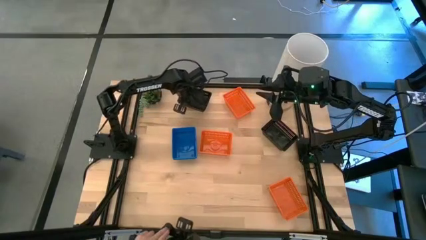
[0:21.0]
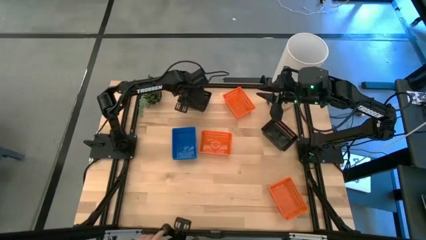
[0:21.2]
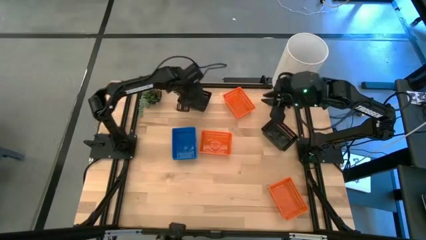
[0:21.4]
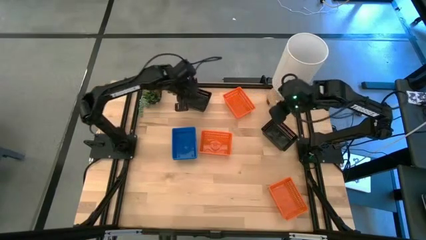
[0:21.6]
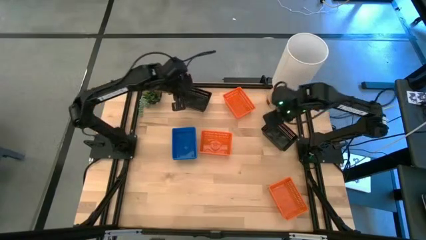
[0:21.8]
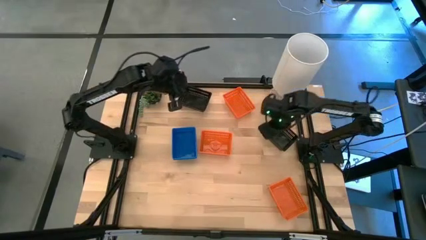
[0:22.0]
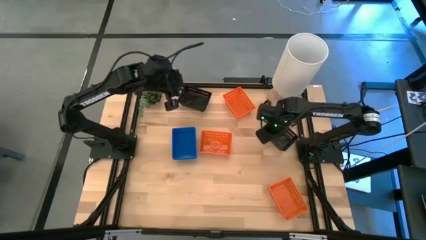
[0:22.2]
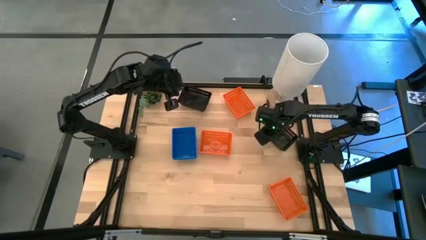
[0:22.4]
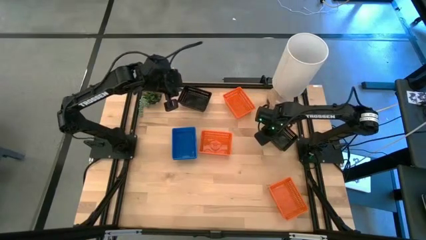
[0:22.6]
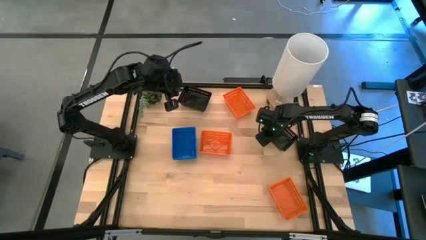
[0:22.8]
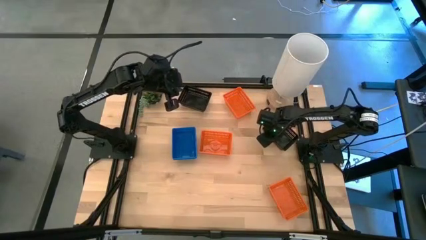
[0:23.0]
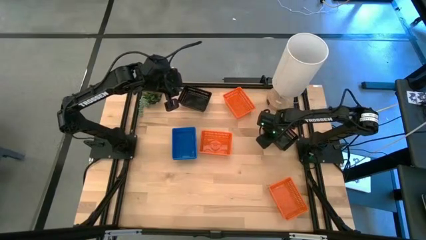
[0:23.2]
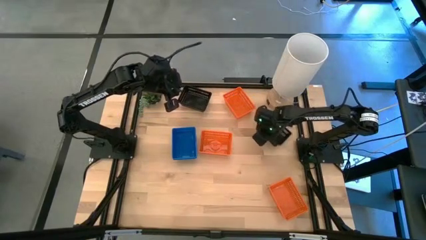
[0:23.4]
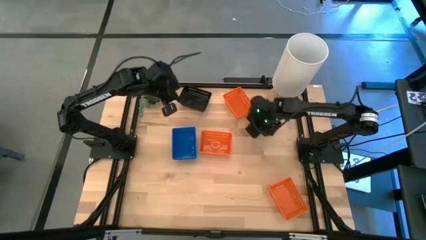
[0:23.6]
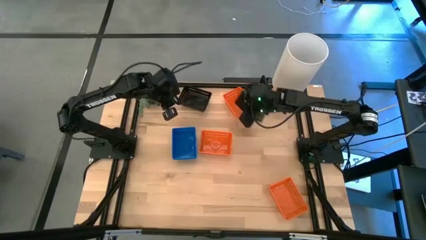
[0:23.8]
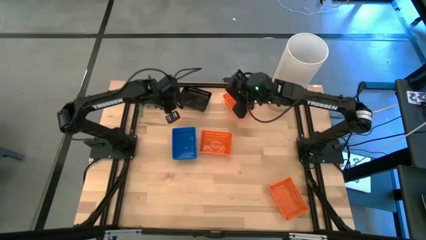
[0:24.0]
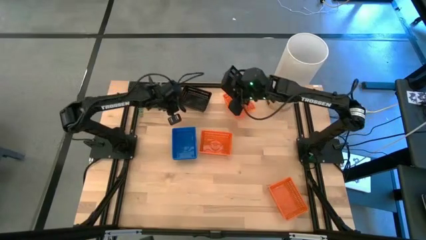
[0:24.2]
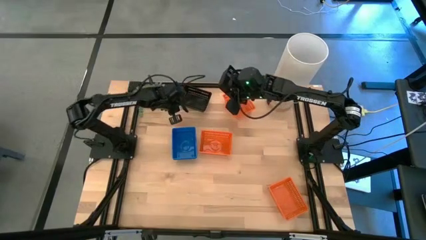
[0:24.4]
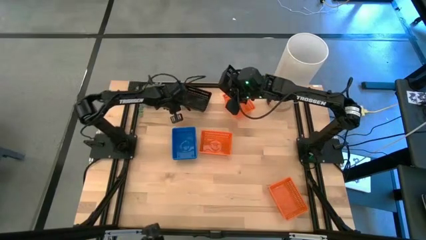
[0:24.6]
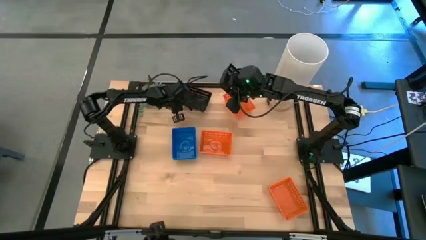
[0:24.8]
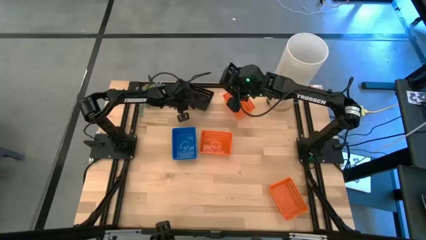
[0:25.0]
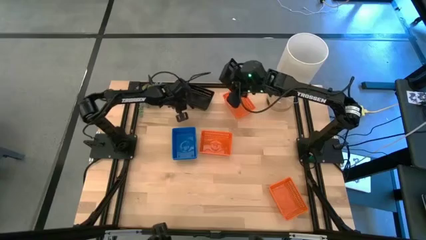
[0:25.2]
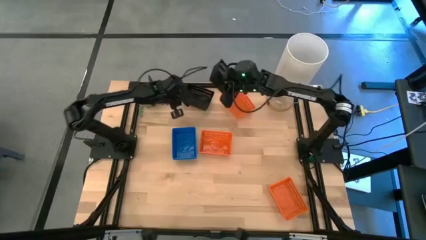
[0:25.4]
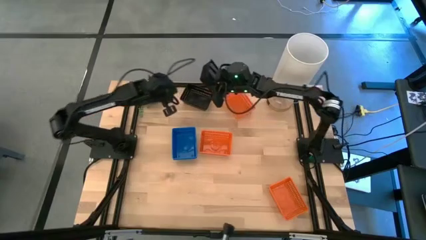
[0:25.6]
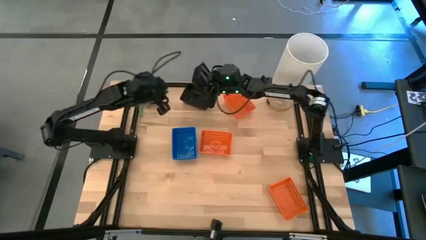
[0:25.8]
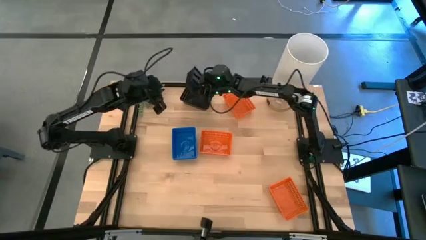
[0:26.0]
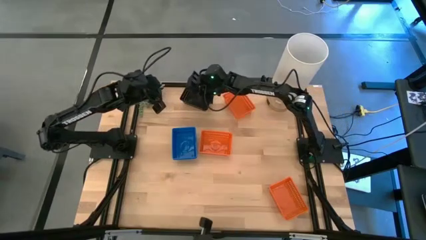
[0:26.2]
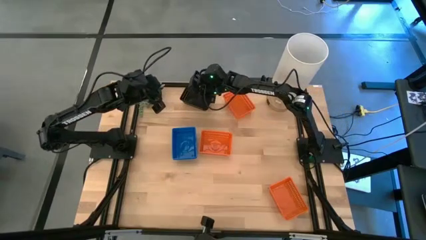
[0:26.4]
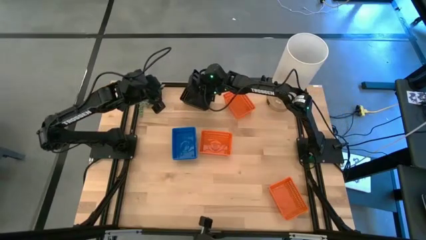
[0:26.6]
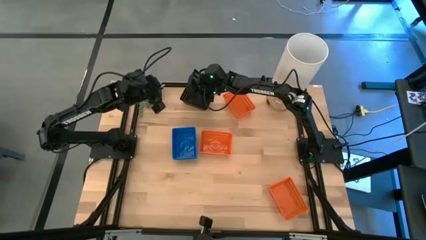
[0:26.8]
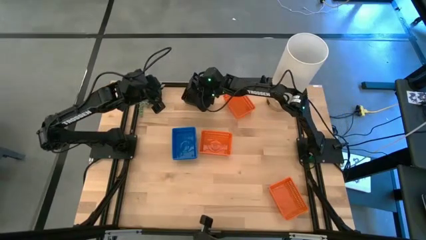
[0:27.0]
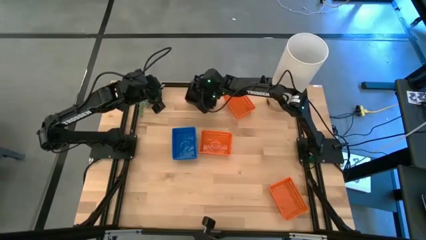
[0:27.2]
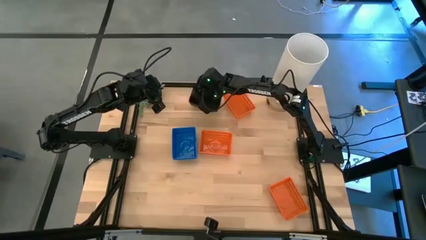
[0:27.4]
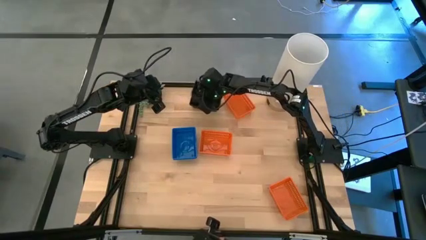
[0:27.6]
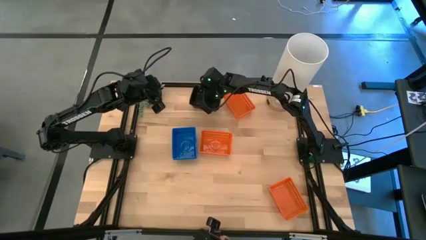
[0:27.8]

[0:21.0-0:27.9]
Stack the black bin on the top black bin

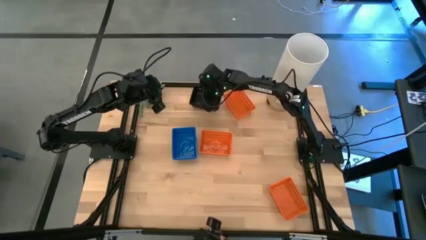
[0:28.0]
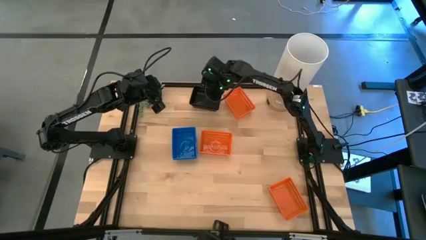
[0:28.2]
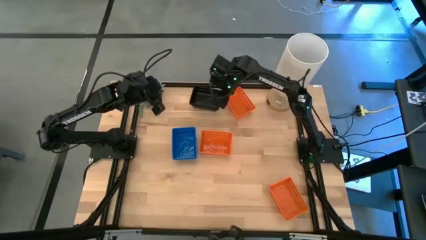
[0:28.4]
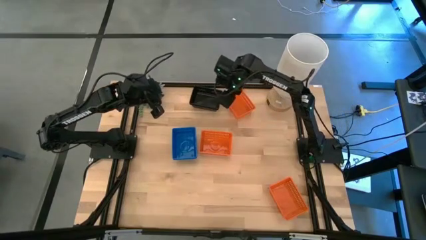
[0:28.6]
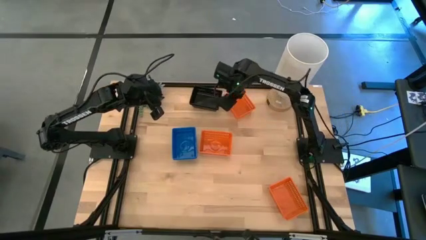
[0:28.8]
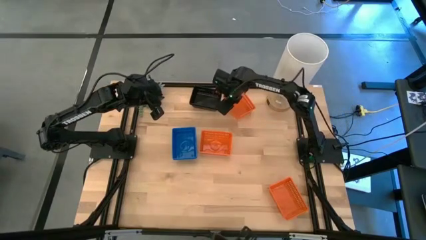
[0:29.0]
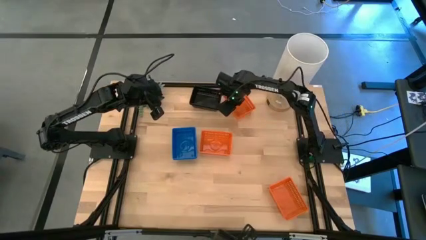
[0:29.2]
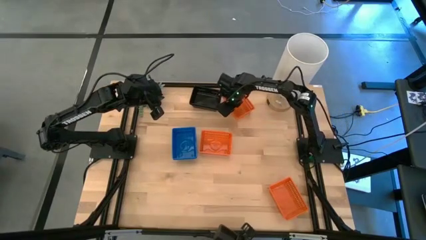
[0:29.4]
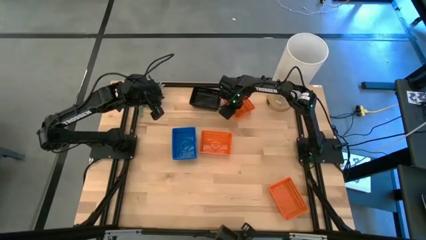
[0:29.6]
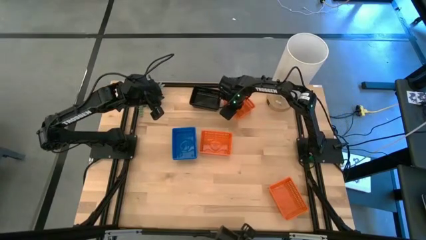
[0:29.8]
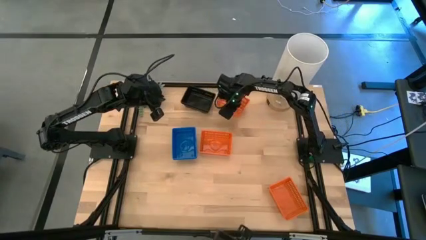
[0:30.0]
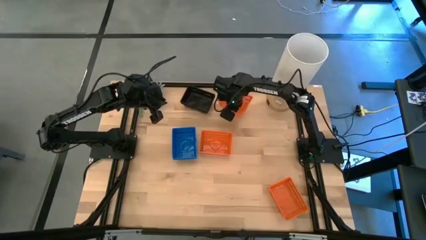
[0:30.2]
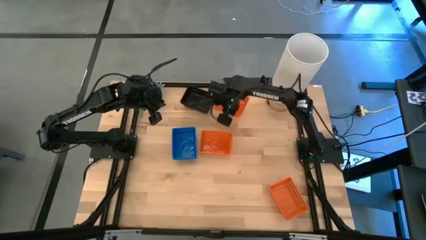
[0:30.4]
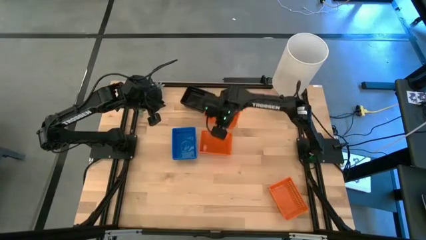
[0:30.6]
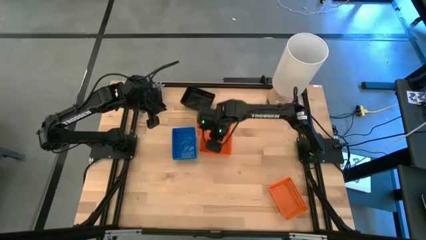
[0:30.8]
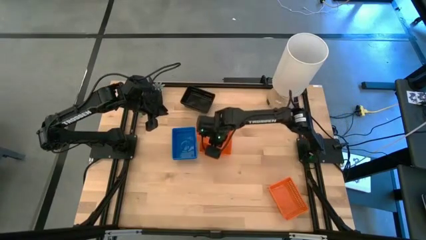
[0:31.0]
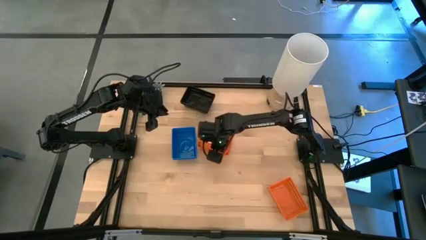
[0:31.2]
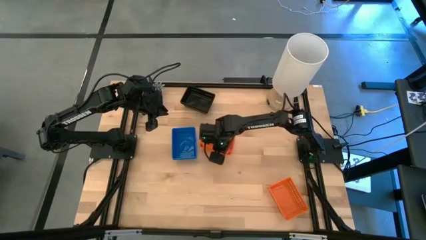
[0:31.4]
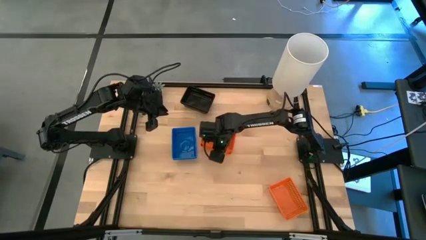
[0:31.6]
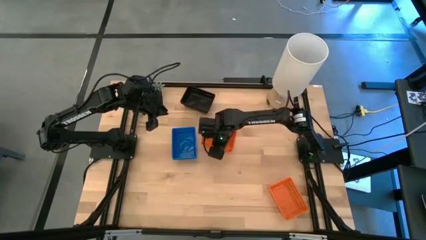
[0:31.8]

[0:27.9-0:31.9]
Stack the top orange bin on the middle orange bin

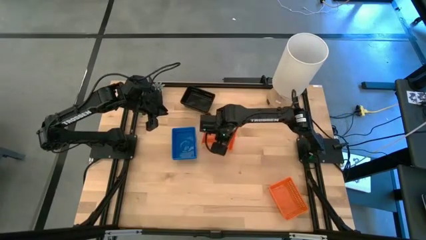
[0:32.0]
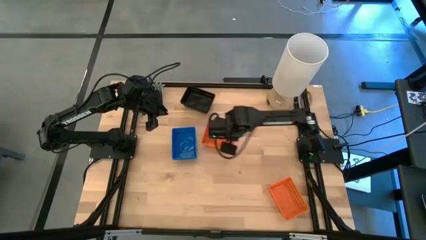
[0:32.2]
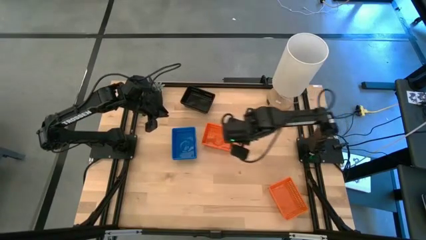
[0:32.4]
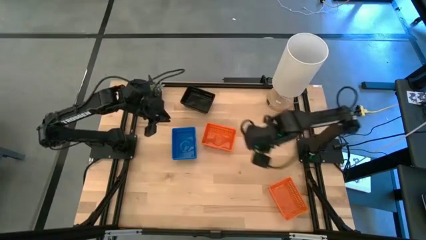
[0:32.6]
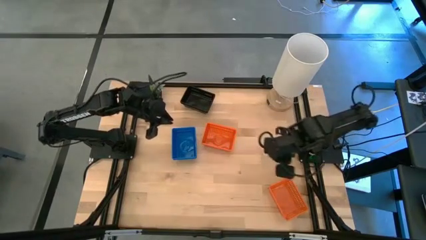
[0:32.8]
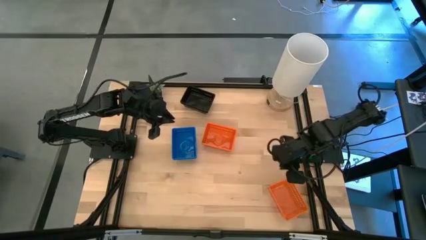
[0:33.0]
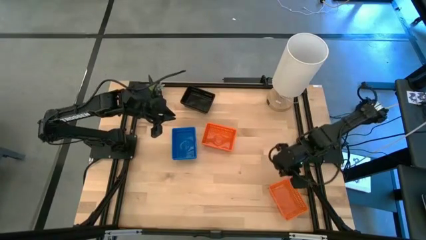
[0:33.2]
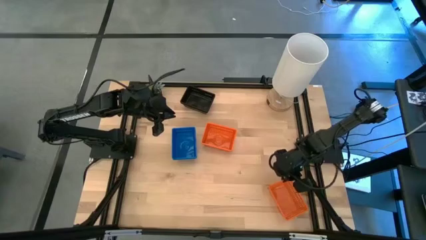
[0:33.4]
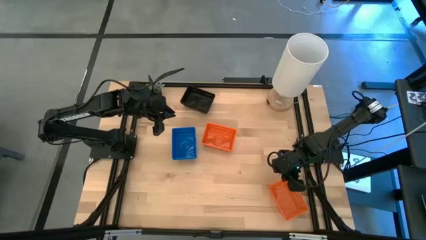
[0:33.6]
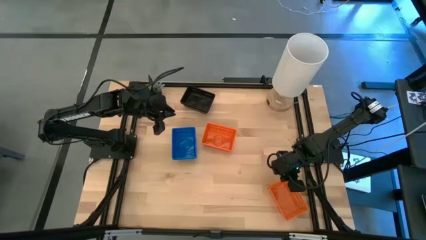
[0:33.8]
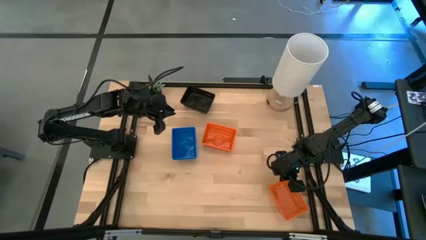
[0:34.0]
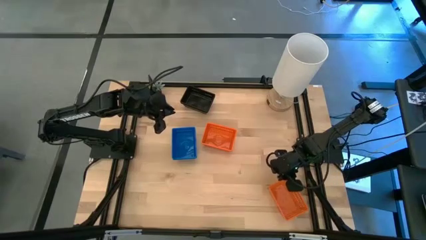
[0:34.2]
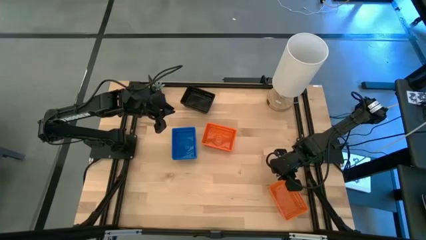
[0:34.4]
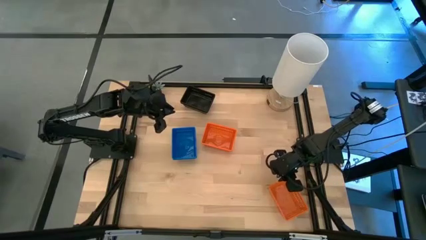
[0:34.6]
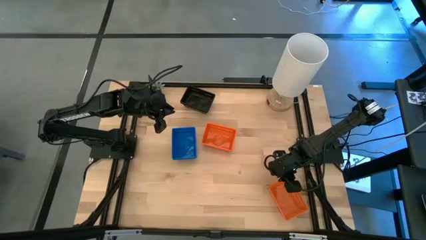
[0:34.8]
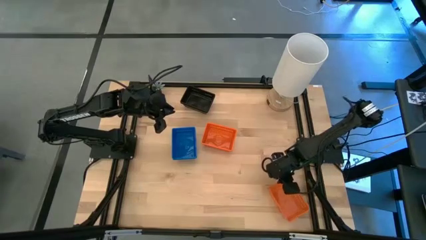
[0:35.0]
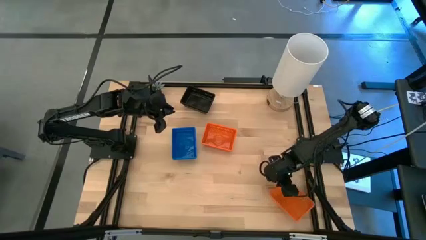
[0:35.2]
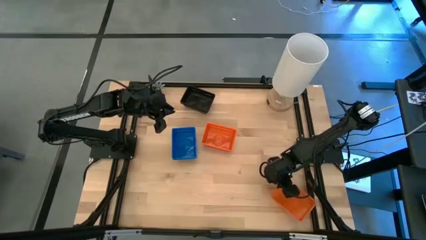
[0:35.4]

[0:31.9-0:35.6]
Stack the orange bin on the middle orange bin

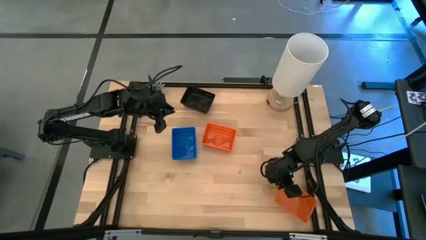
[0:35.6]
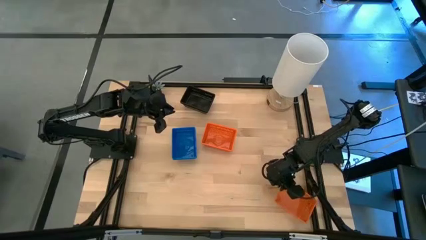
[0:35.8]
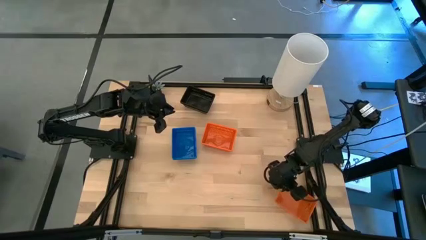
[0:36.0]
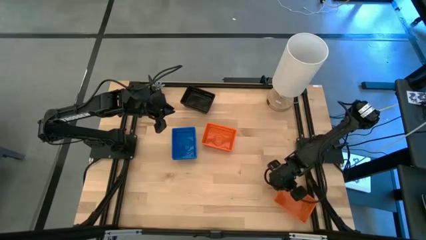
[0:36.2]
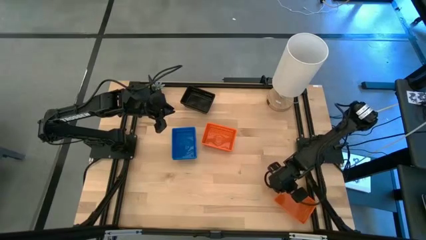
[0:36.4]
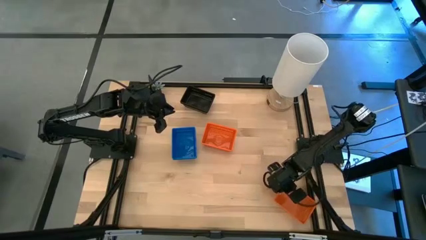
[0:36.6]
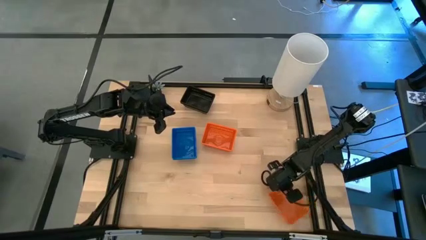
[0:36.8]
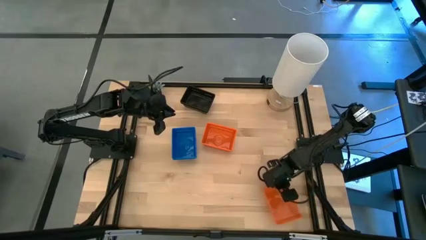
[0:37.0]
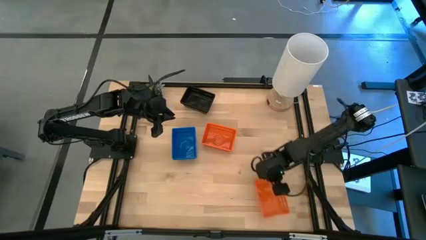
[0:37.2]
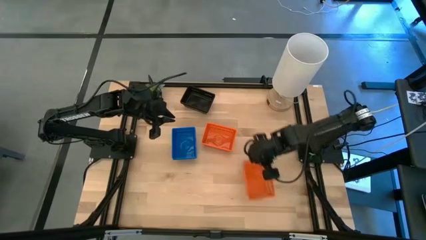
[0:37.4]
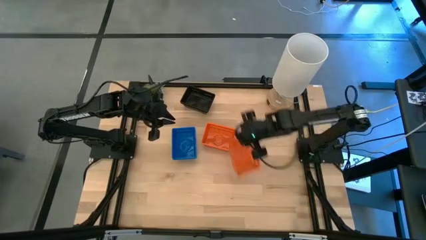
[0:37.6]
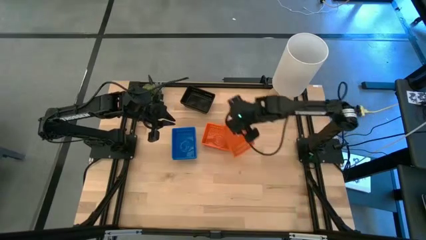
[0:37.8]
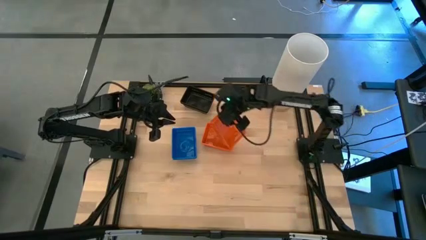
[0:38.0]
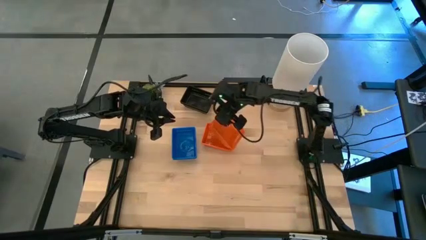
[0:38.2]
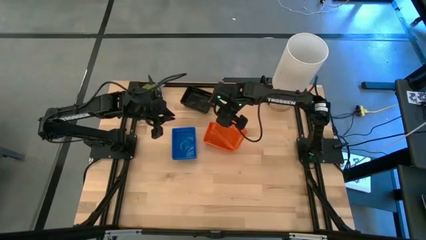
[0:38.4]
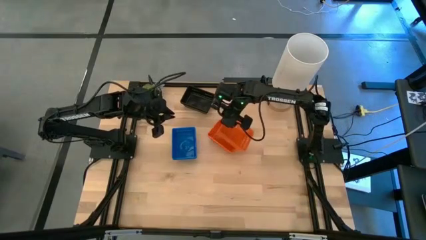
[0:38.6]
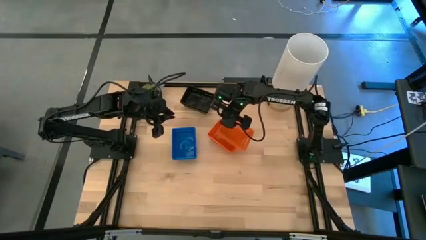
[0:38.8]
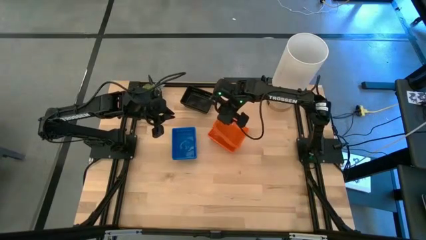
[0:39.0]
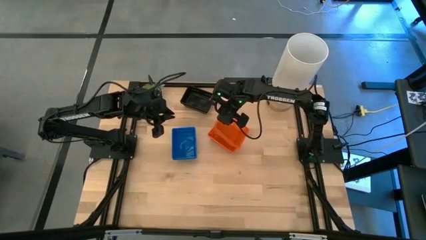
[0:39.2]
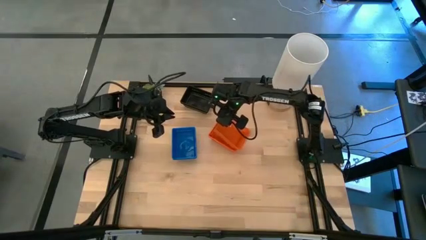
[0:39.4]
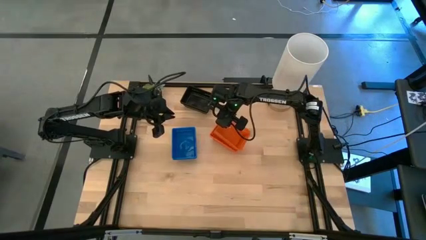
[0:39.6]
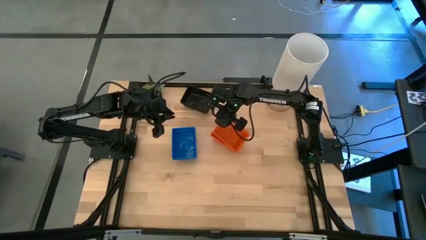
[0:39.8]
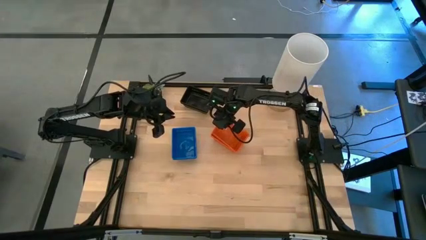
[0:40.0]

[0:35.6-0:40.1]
Stack the orange bin on the middle orange bin
